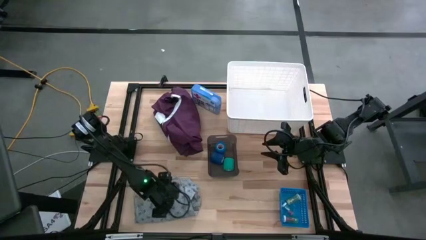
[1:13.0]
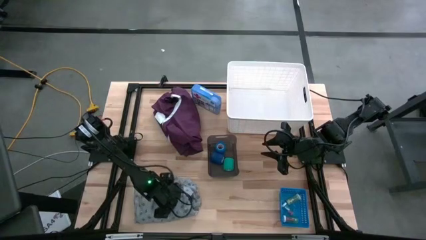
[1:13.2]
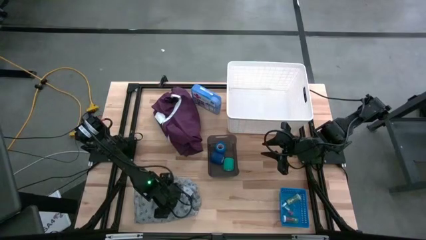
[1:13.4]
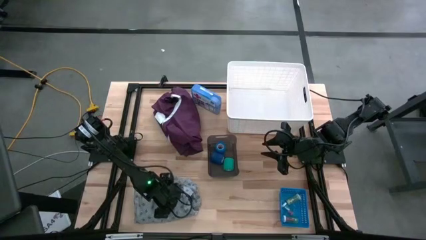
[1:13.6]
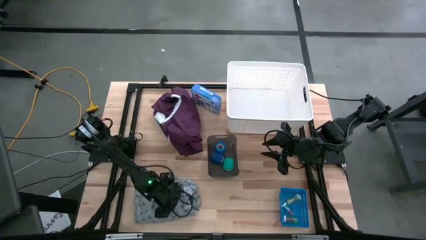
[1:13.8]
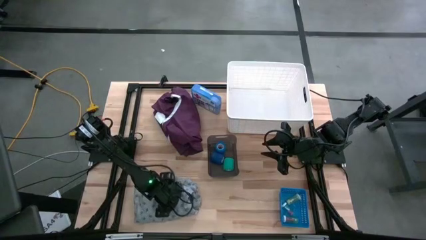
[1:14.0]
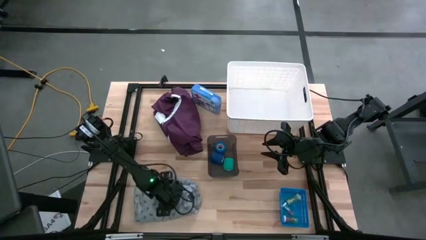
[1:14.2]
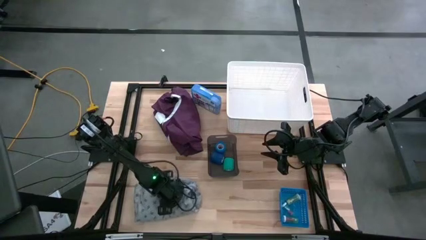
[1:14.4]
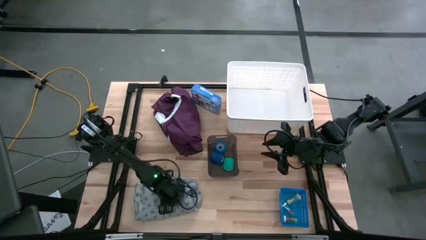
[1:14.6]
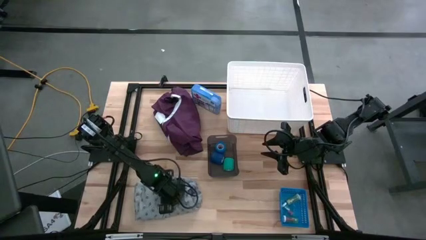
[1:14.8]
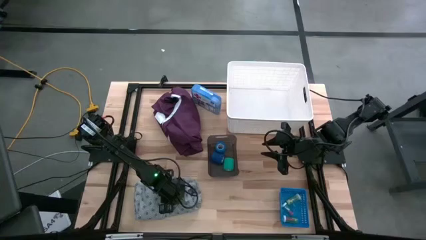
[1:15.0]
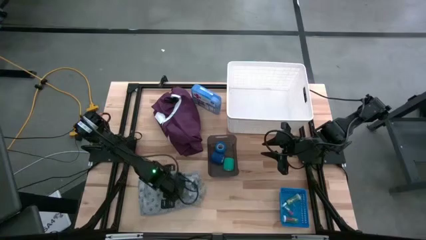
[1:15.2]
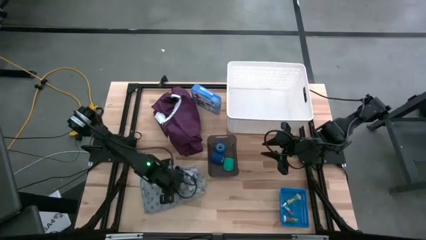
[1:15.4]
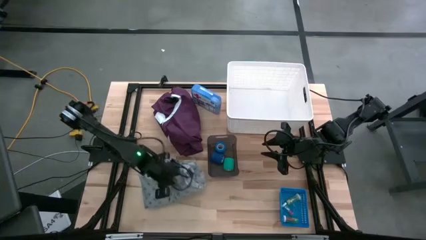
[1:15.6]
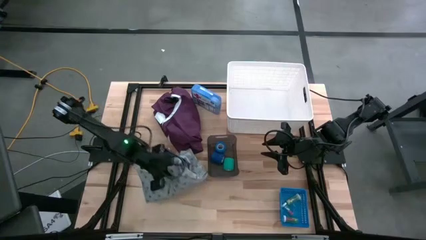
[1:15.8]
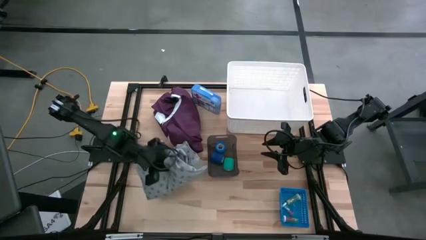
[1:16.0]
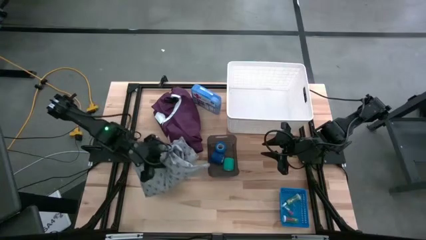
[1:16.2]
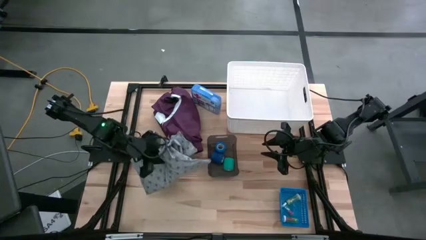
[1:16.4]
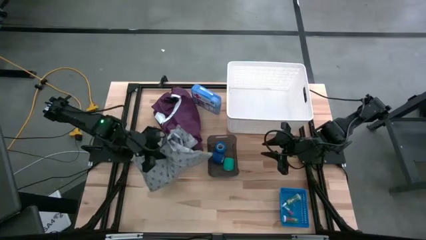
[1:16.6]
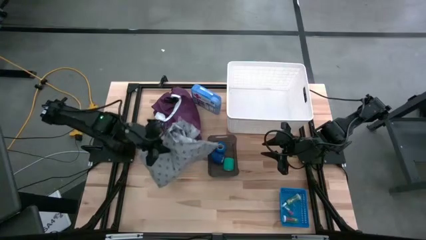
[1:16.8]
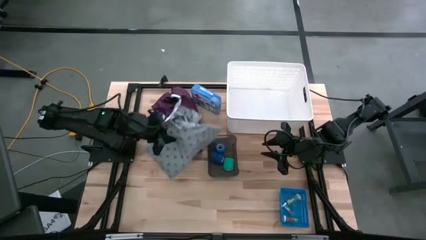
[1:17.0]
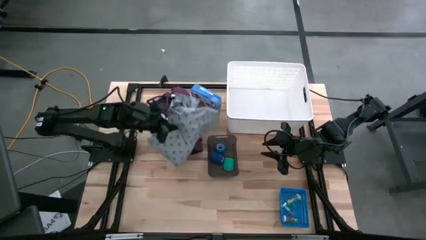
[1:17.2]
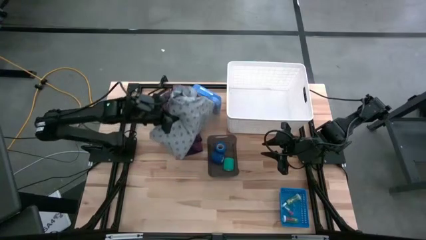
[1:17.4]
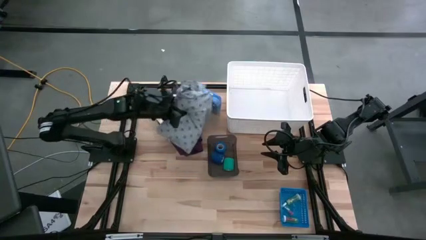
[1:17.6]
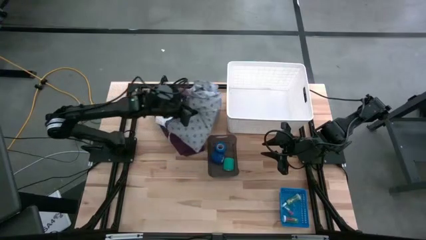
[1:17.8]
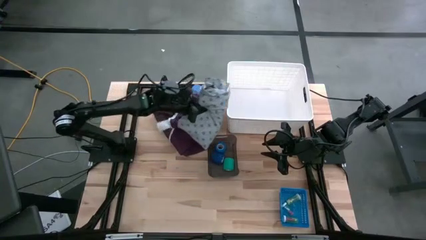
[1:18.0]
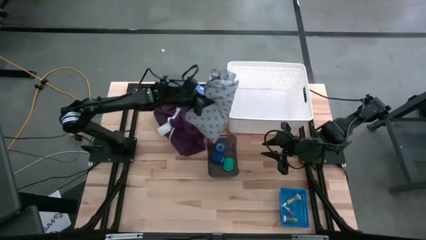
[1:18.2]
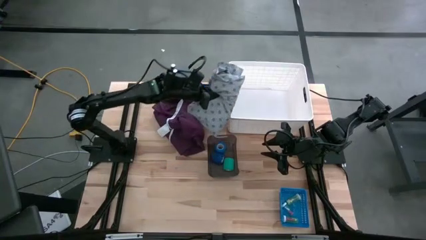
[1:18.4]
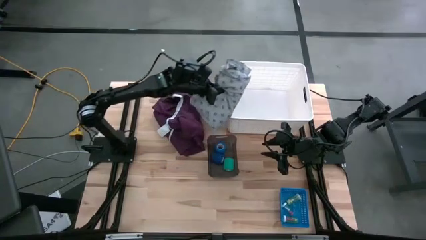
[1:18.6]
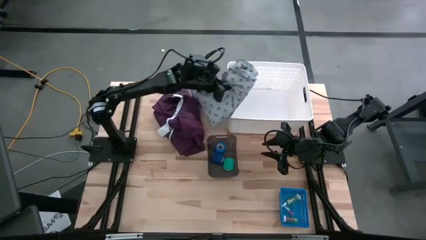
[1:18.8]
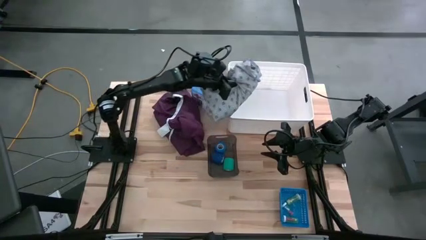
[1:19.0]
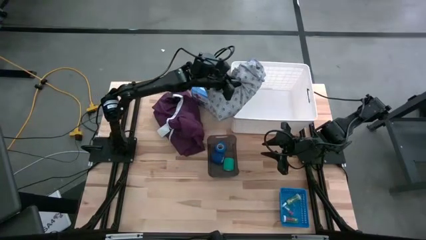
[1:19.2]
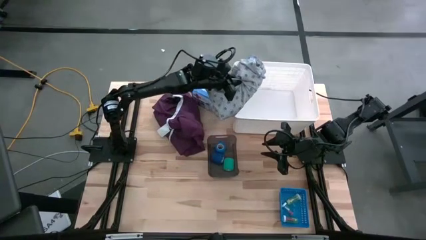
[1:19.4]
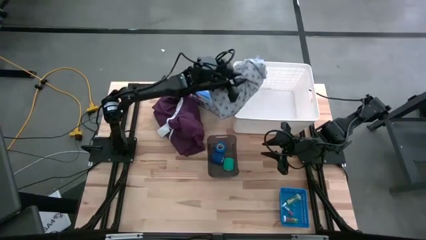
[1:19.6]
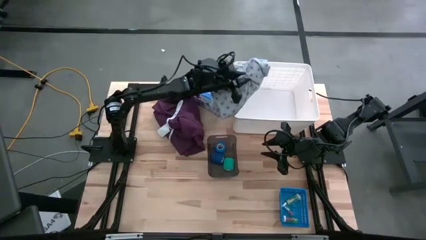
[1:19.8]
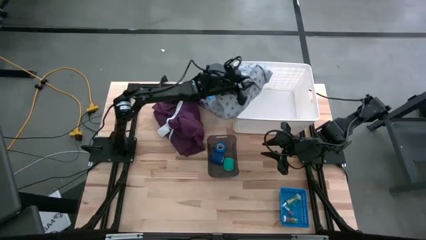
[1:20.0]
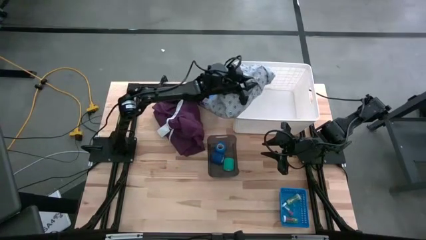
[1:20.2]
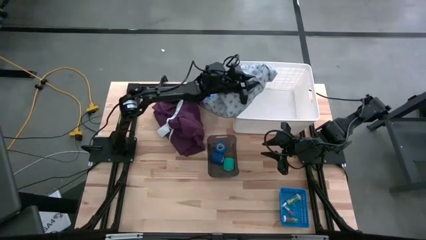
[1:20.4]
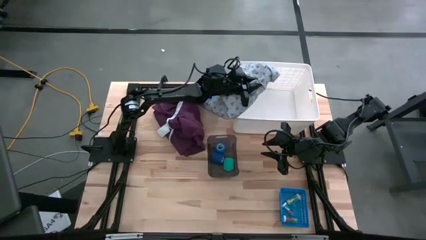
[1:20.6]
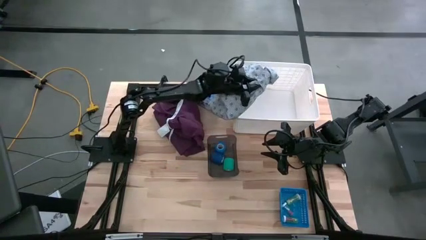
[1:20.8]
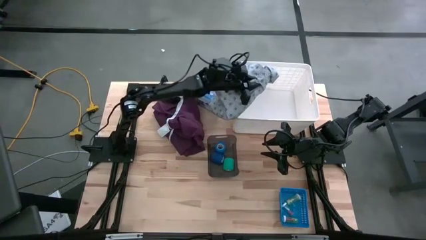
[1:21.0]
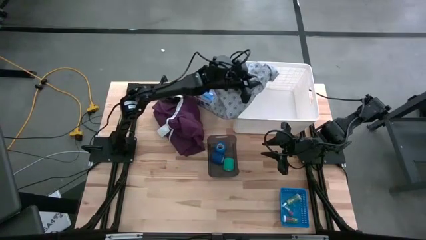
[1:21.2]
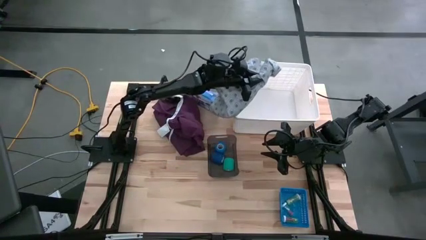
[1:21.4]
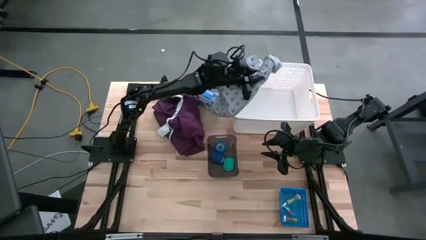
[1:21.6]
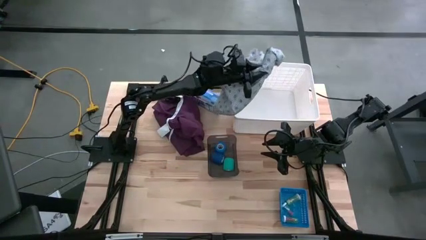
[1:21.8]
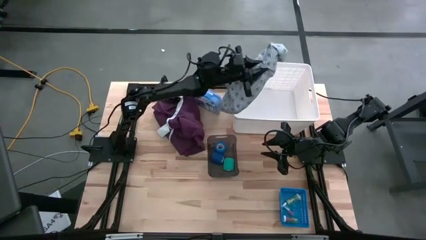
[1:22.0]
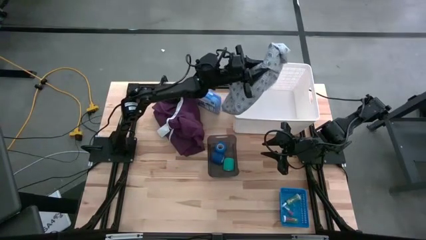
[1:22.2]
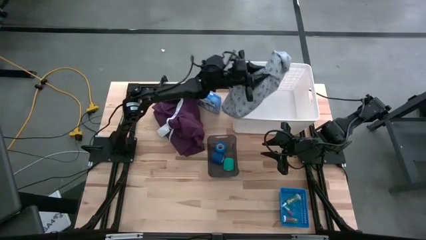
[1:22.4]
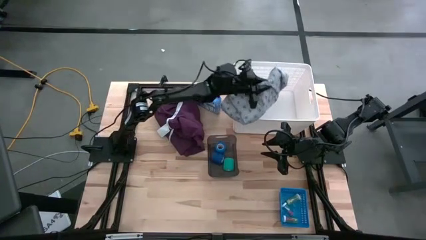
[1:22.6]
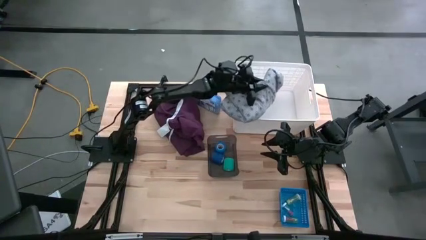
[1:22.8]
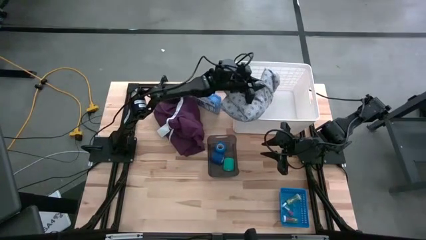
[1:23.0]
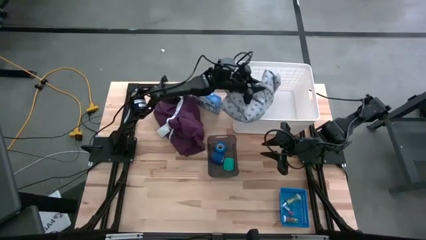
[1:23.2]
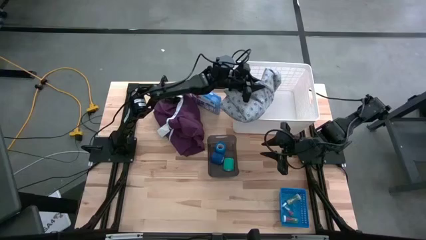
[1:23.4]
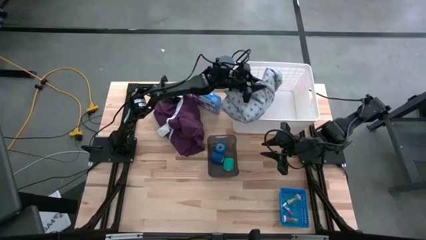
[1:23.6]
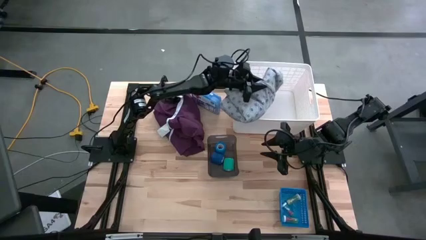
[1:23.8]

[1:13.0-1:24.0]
Task: Pick & Place Medicine items
Put the blue patient gown into the white laundry bin
